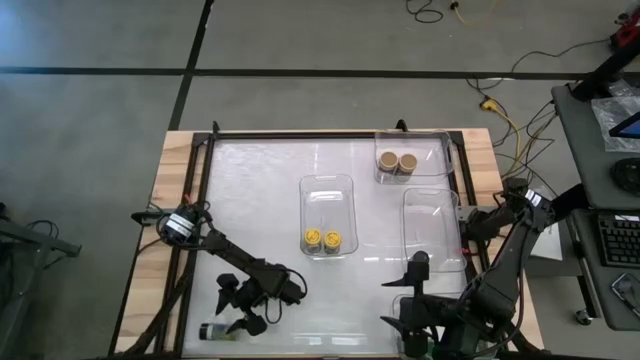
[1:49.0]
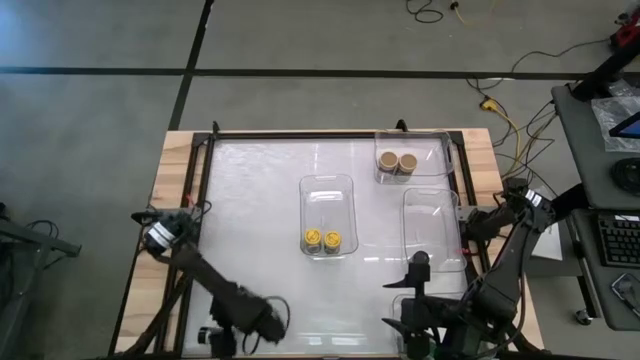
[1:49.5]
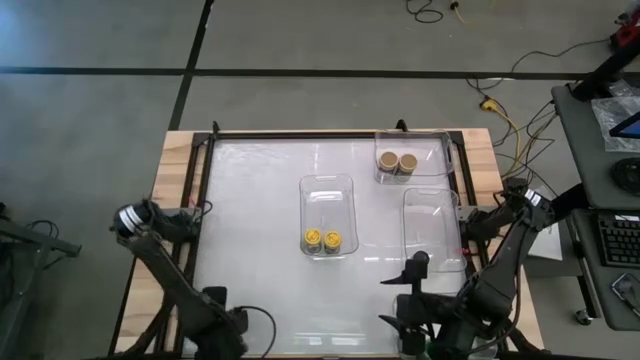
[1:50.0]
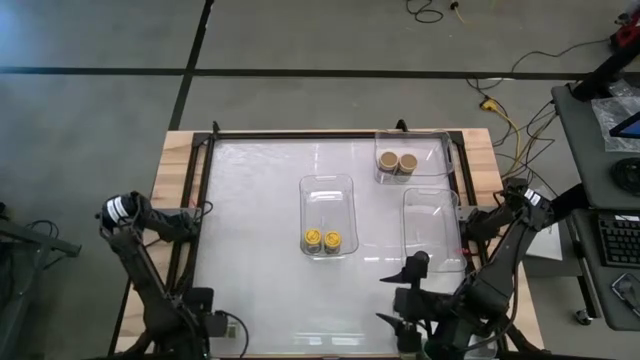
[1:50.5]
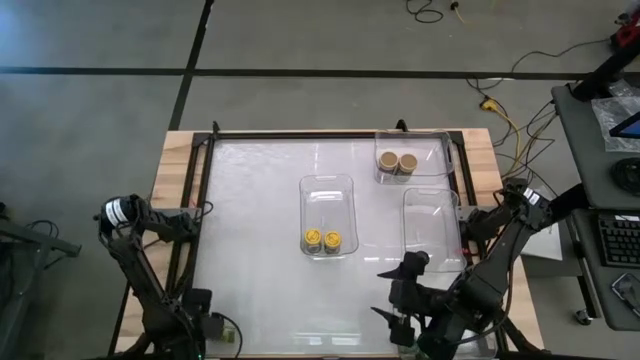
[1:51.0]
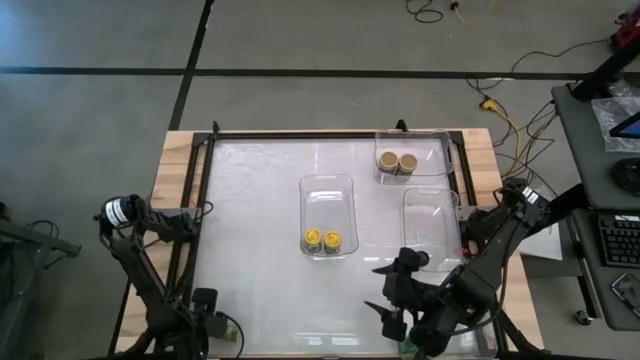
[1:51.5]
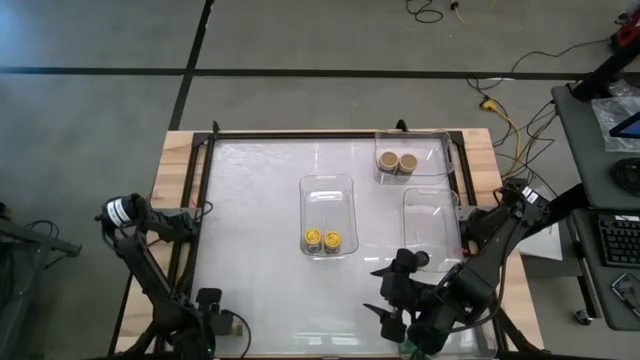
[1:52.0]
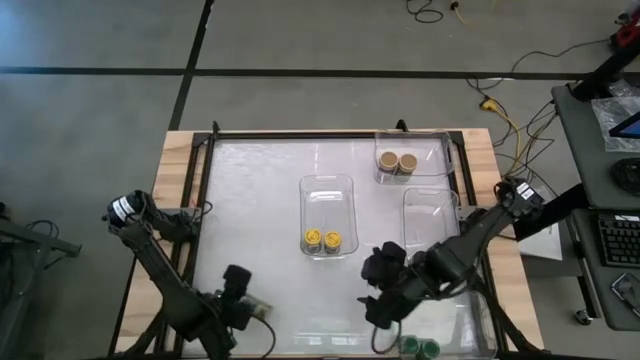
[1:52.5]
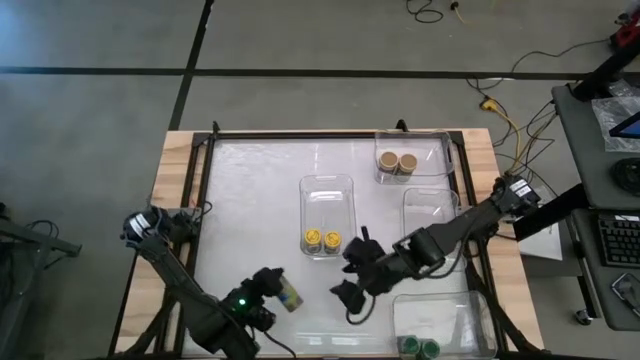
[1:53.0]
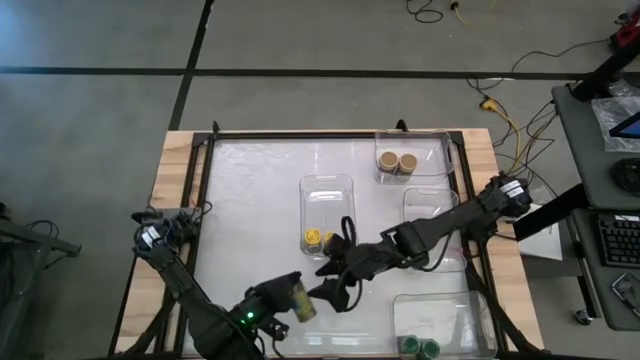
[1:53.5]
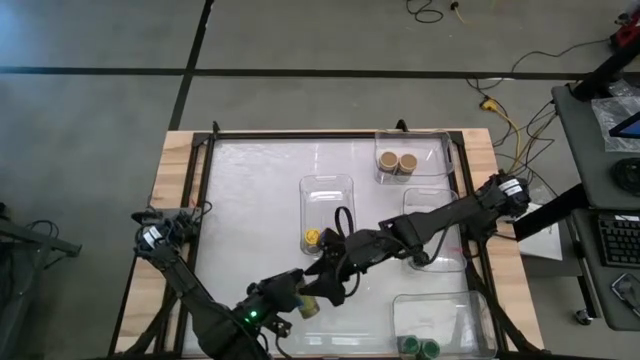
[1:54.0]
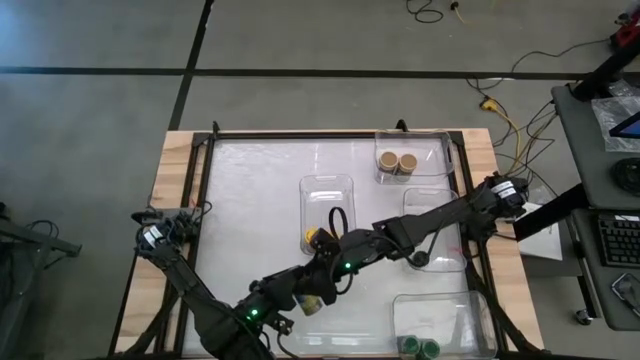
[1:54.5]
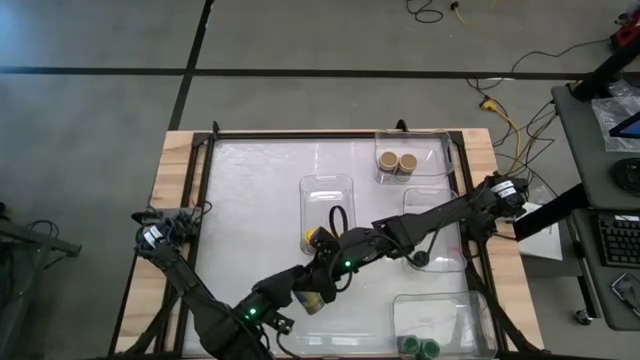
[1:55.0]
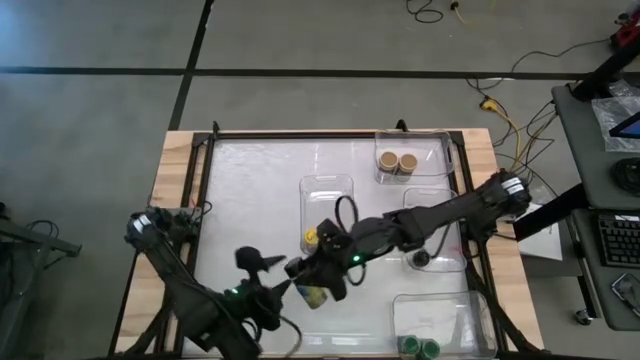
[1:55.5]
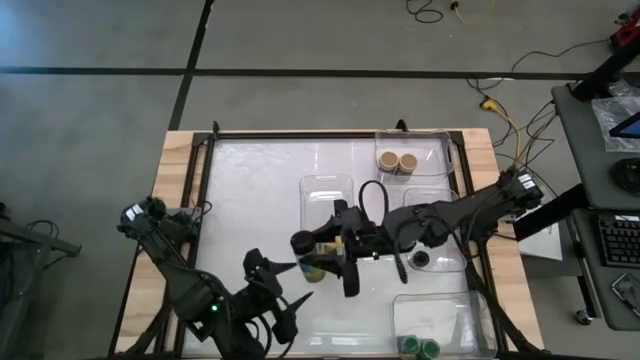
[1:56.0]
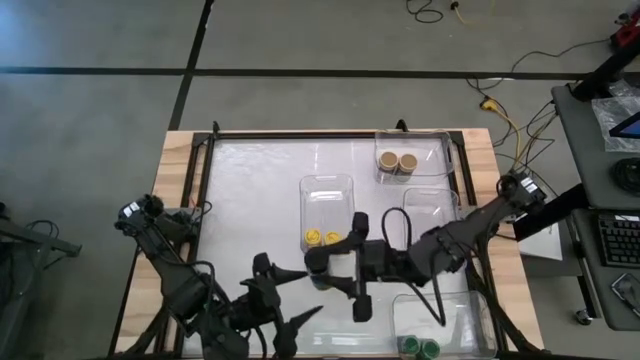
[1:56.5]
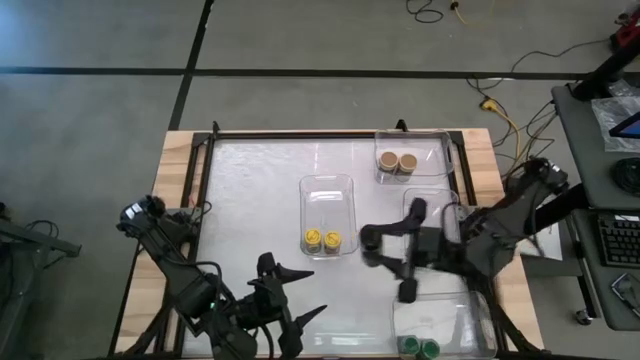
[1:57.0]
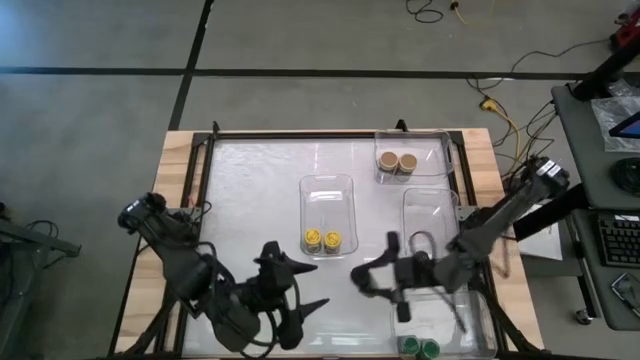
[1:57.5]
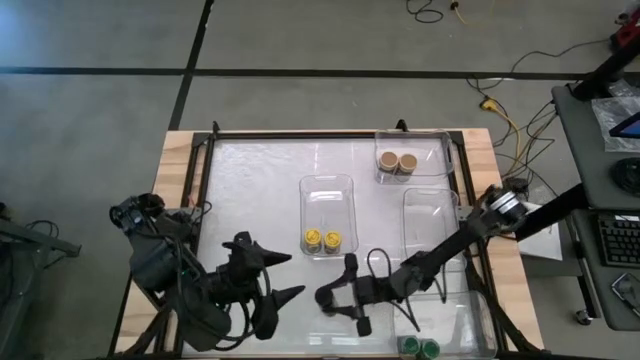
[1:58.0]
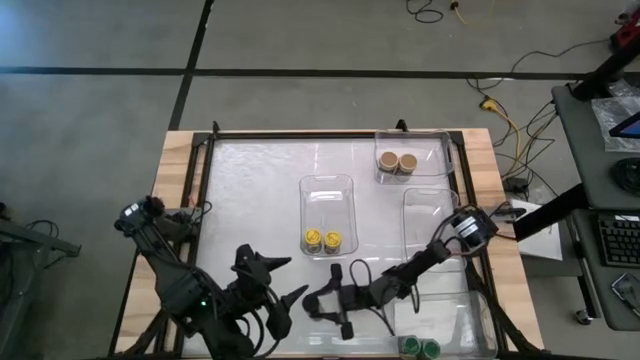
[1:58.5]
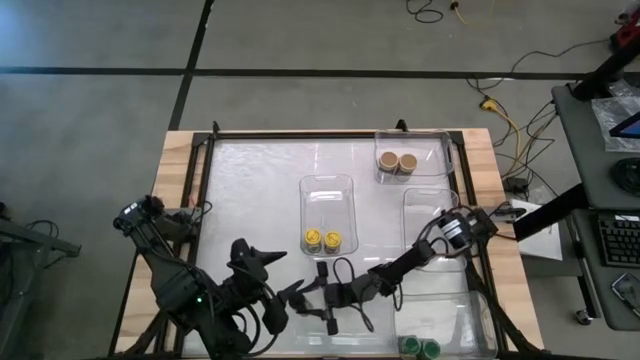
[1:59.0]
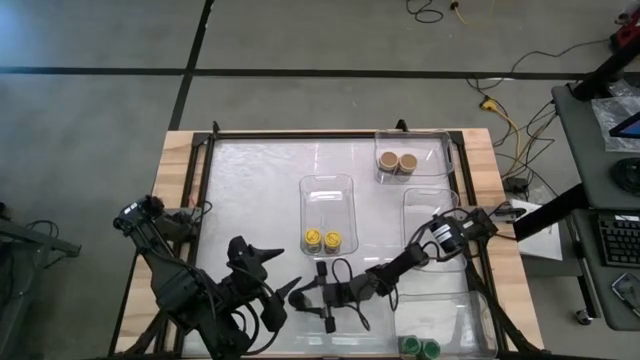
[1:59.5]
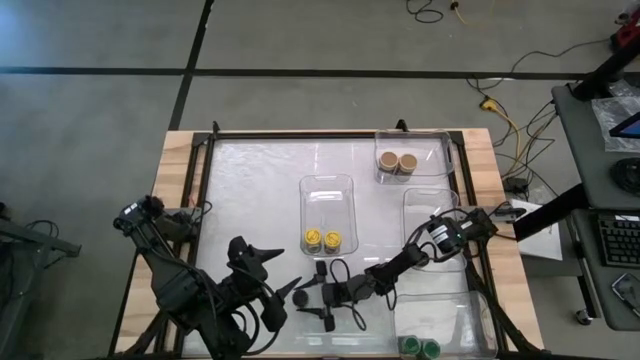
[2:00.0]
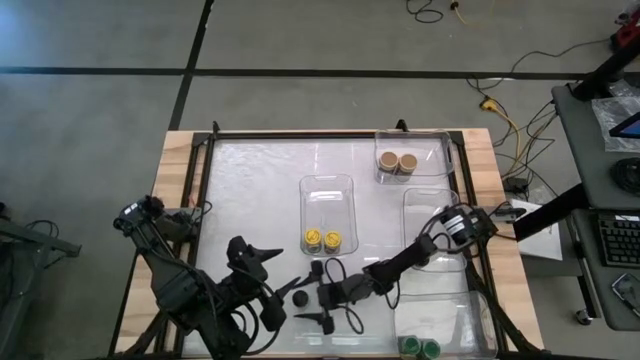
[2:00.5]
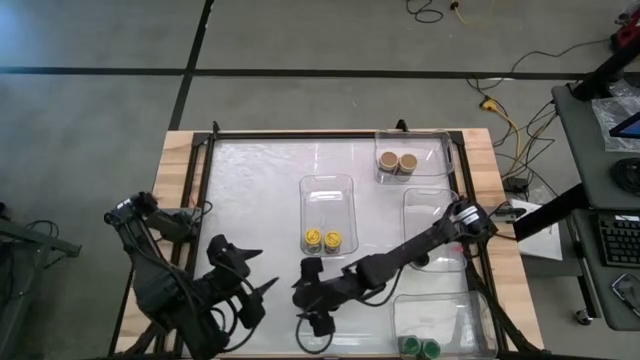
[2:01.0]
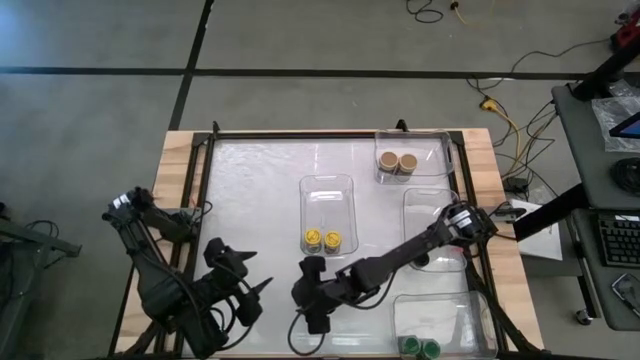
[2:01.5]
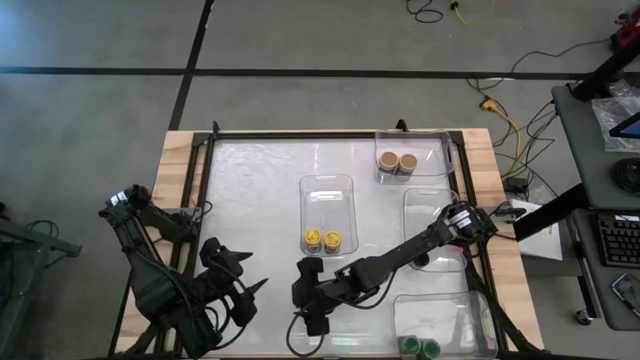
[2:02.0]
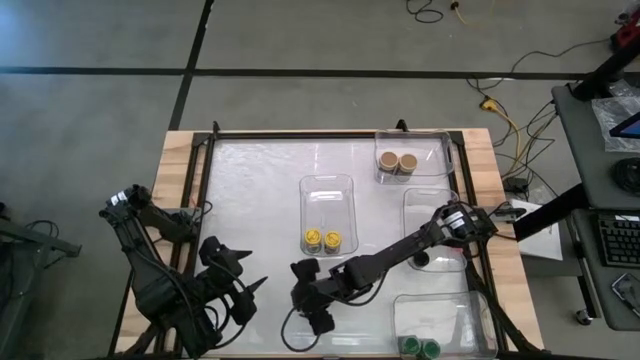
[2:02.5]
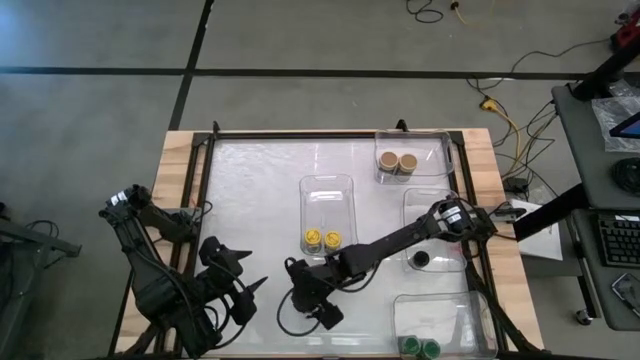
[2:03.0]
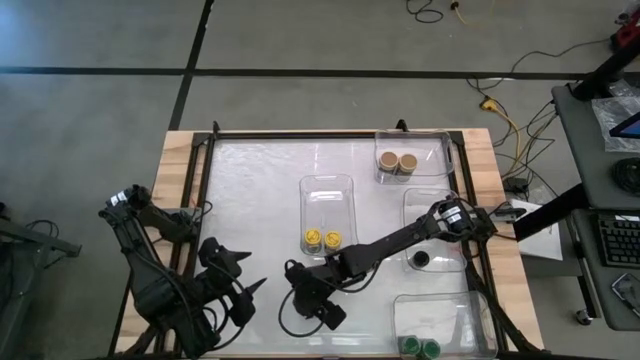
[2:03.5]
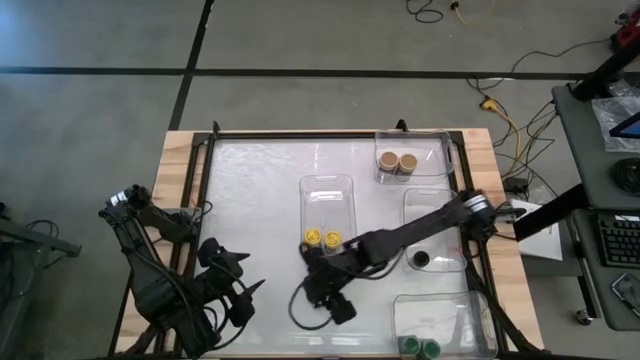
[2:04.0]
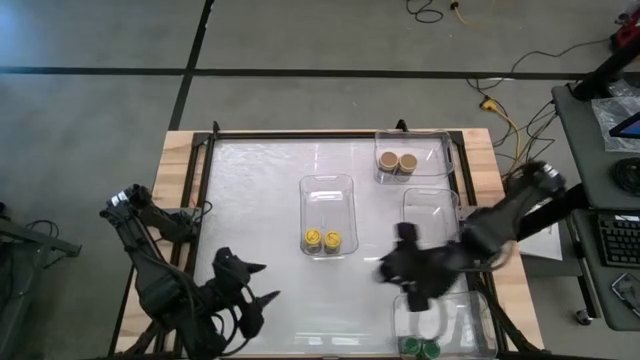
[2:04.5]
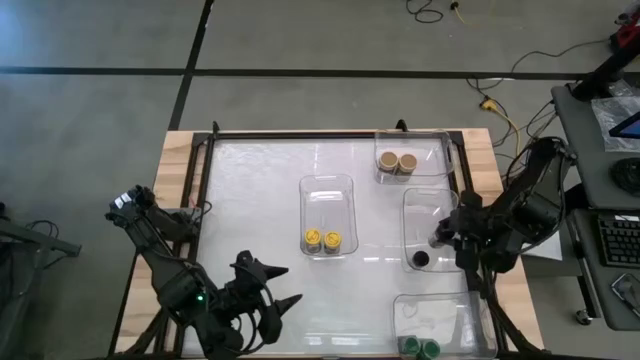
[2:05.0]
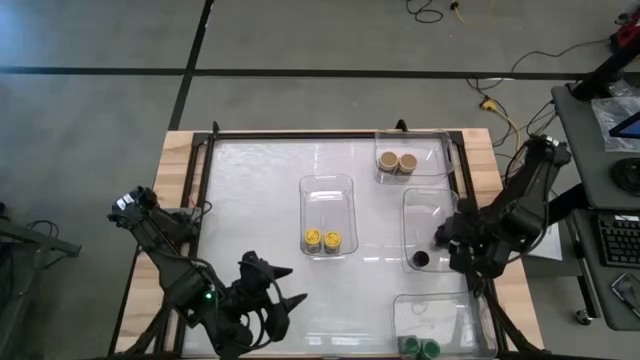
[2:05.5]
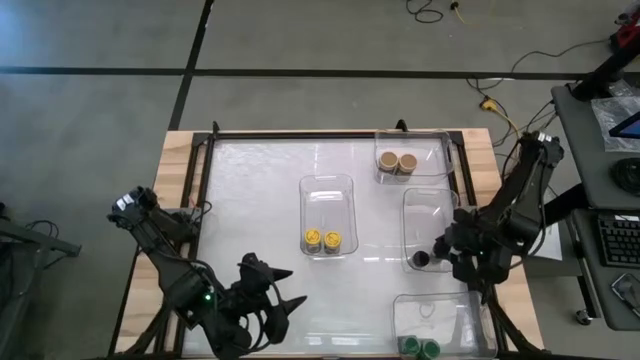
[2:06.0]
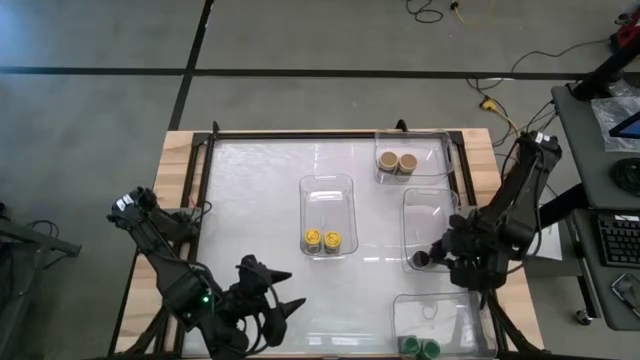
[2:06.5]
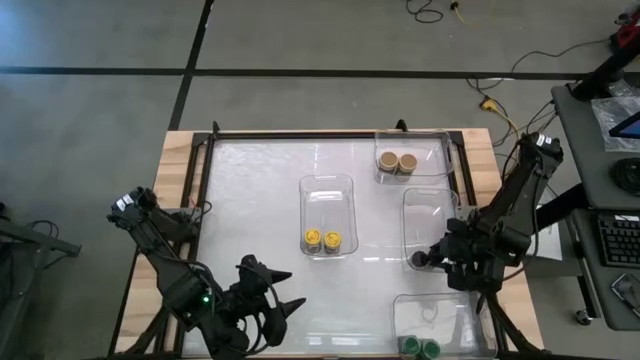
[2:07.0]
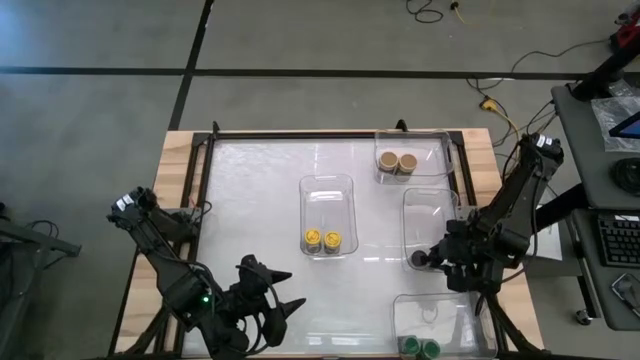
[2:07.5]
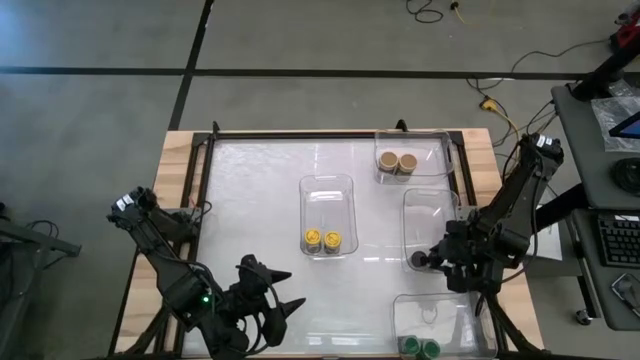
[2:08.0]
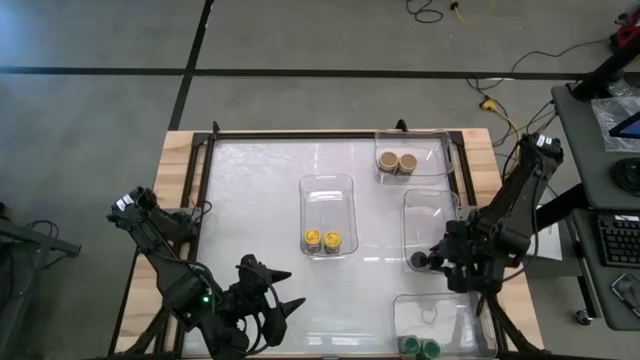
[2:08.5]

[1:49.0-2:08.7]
Task: Sort spices by type
Put the black seasoning bottle into the middle right transparent bin
